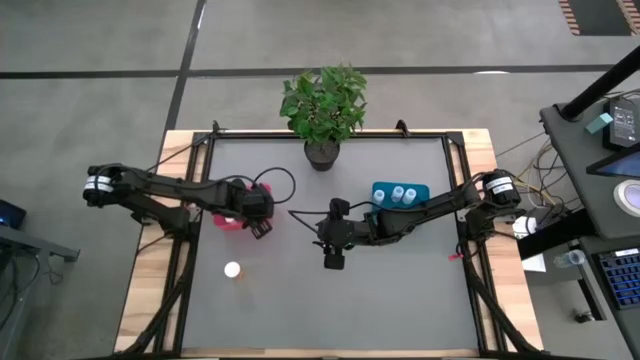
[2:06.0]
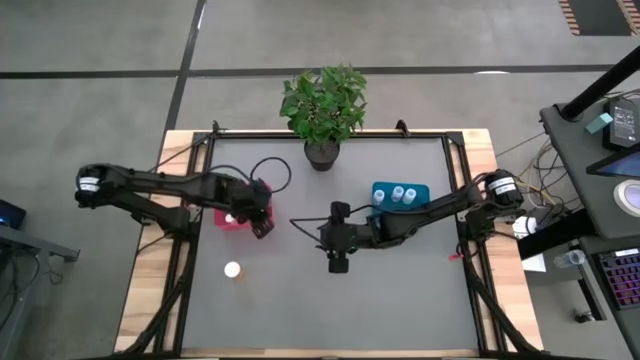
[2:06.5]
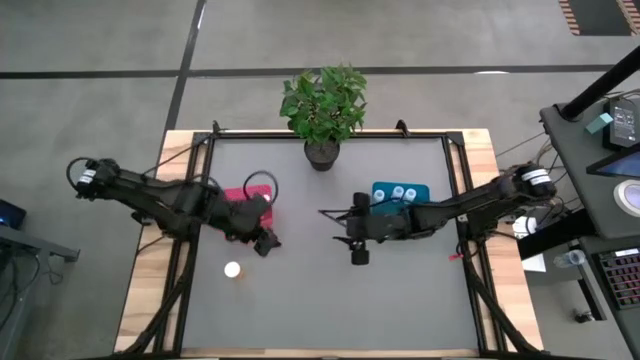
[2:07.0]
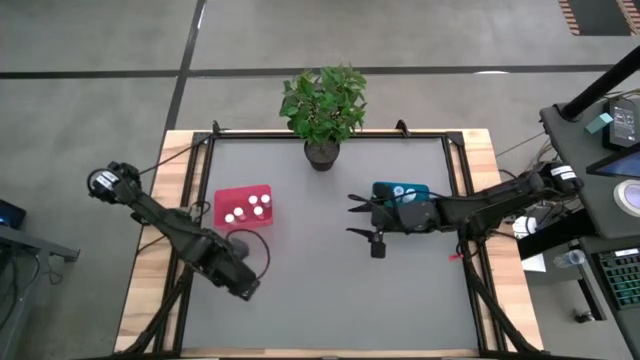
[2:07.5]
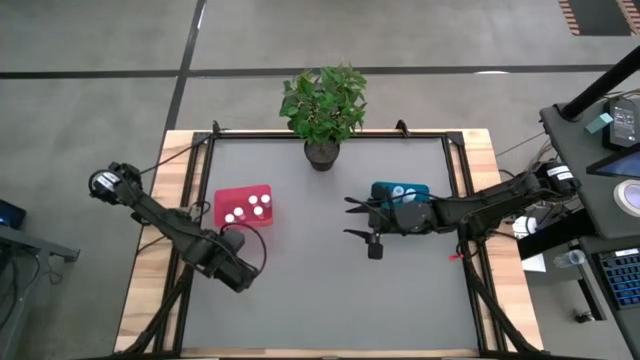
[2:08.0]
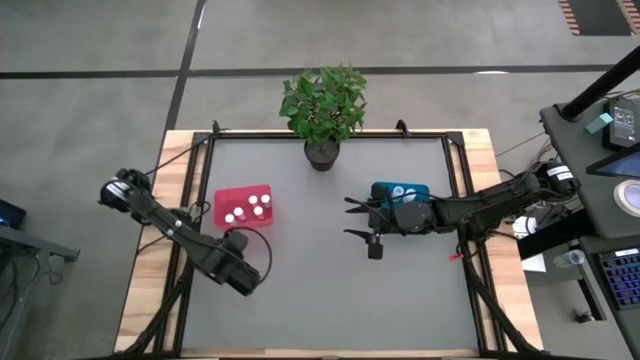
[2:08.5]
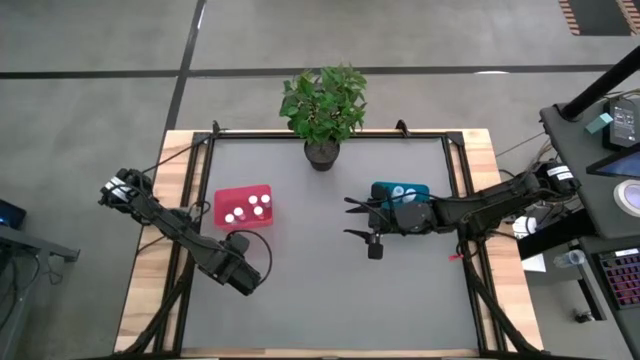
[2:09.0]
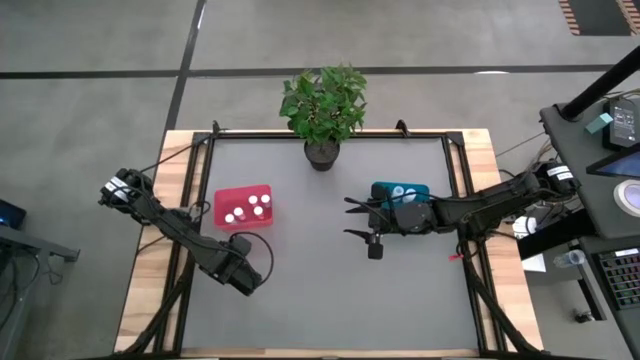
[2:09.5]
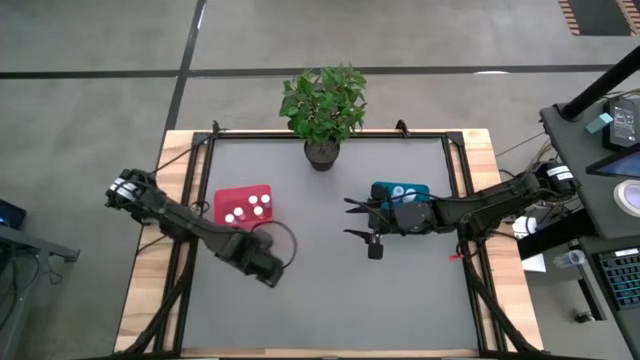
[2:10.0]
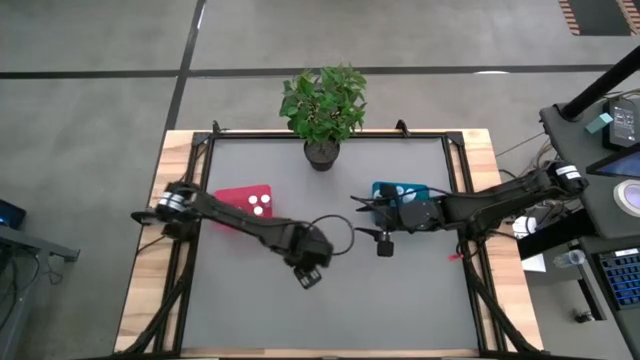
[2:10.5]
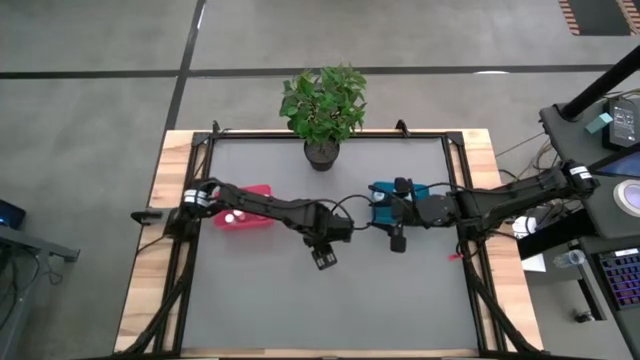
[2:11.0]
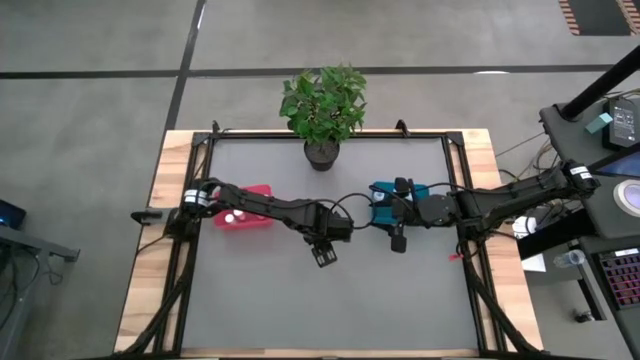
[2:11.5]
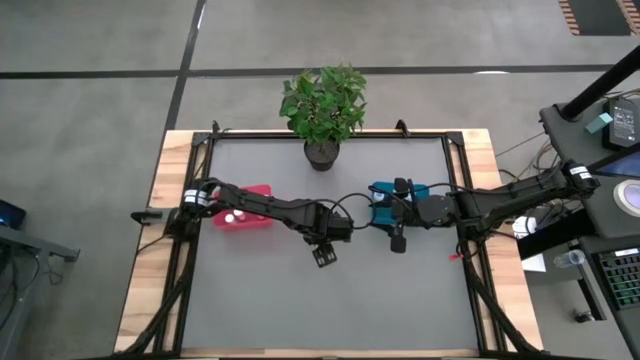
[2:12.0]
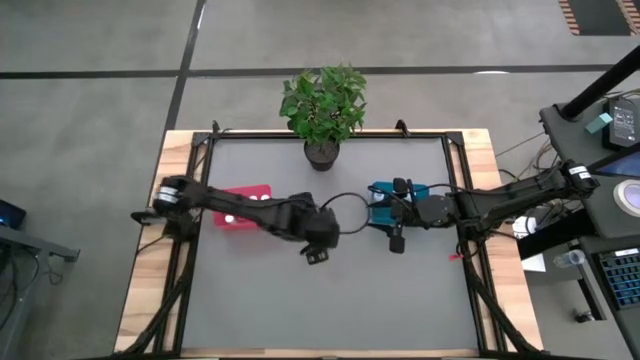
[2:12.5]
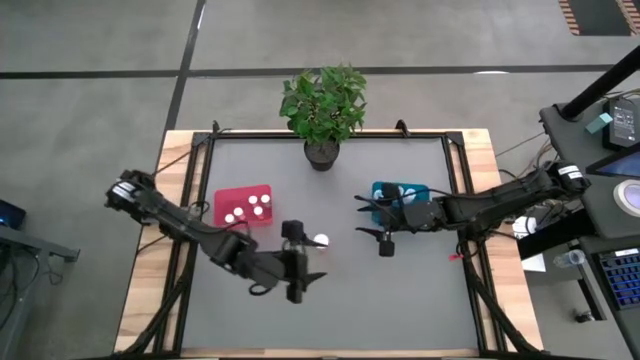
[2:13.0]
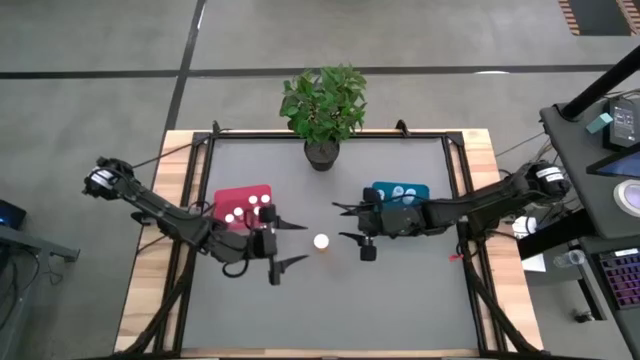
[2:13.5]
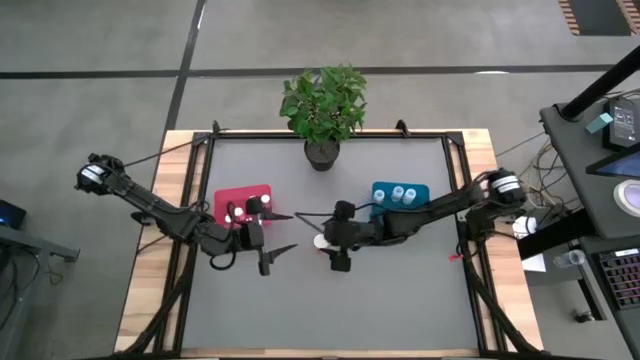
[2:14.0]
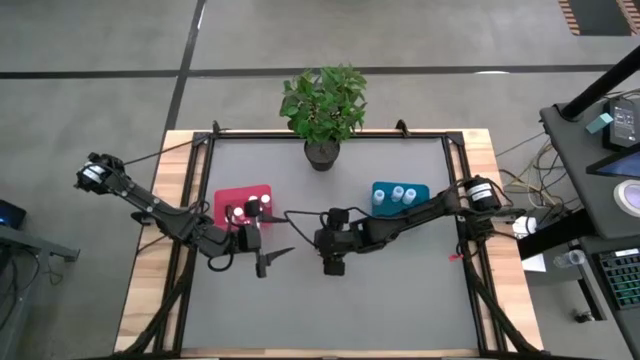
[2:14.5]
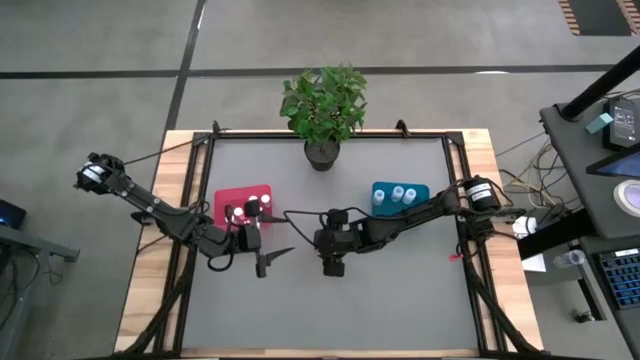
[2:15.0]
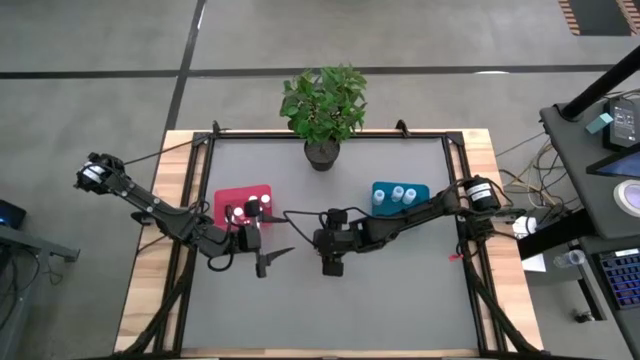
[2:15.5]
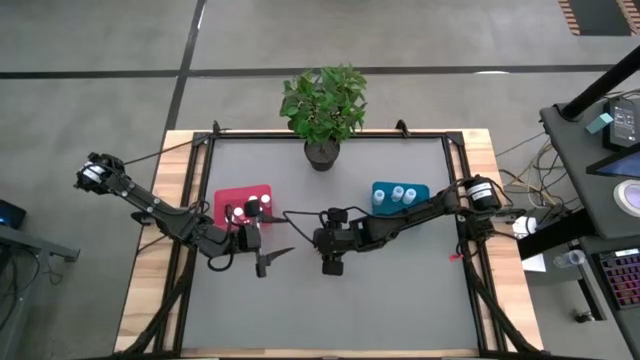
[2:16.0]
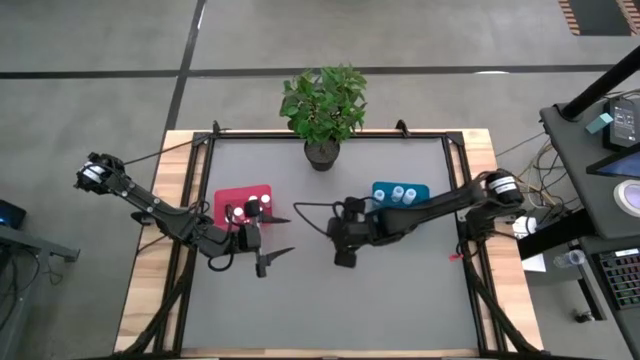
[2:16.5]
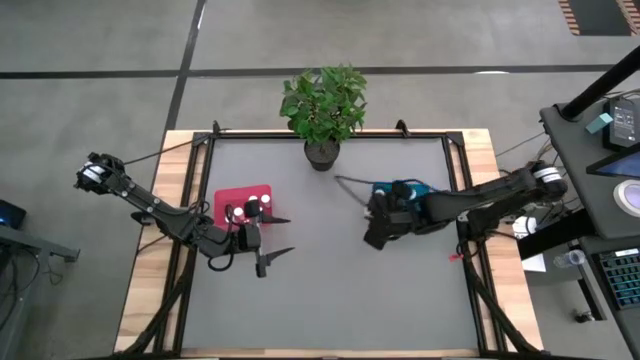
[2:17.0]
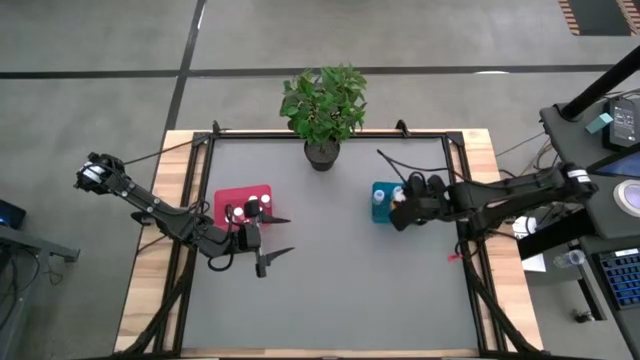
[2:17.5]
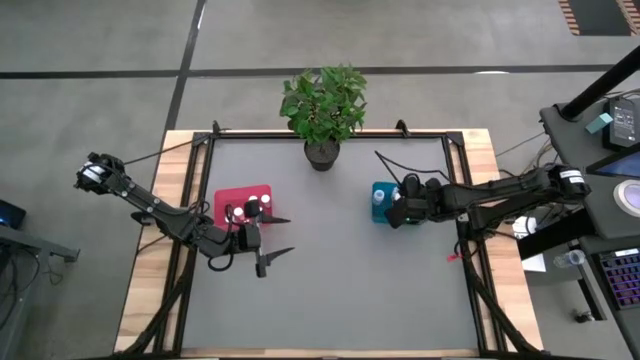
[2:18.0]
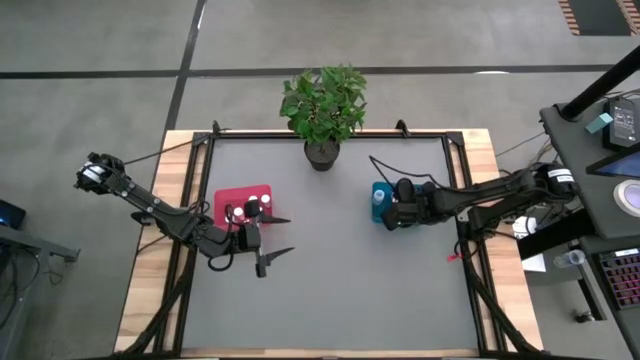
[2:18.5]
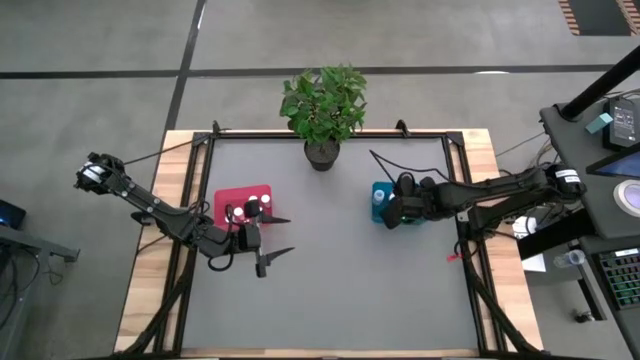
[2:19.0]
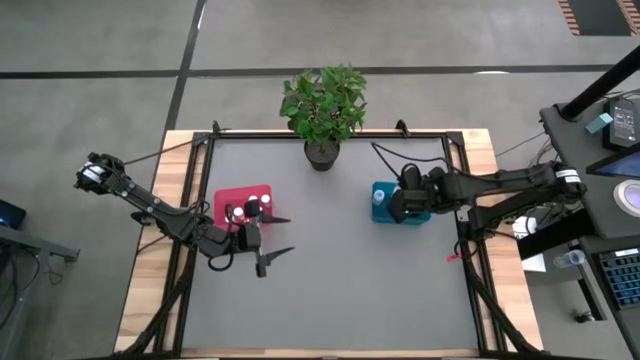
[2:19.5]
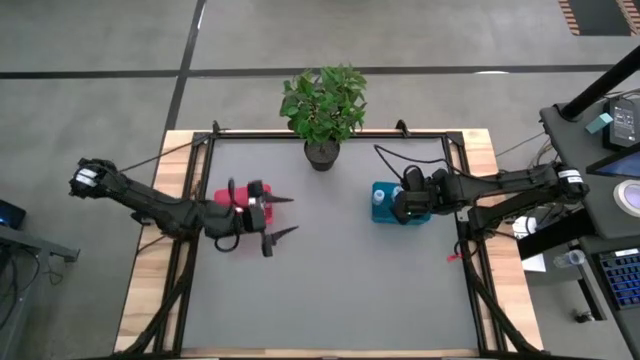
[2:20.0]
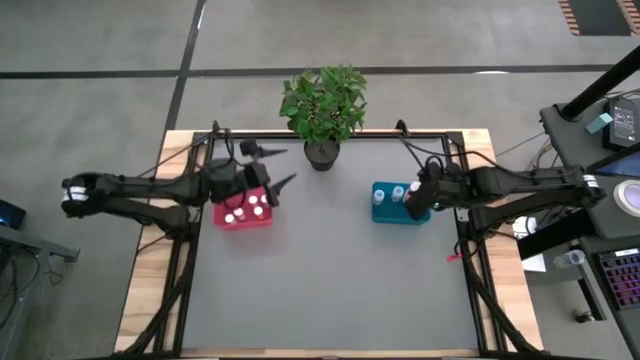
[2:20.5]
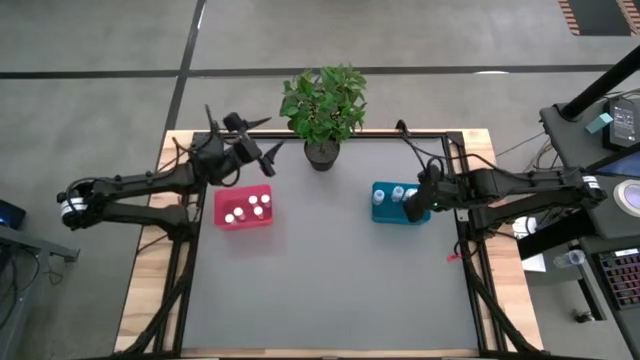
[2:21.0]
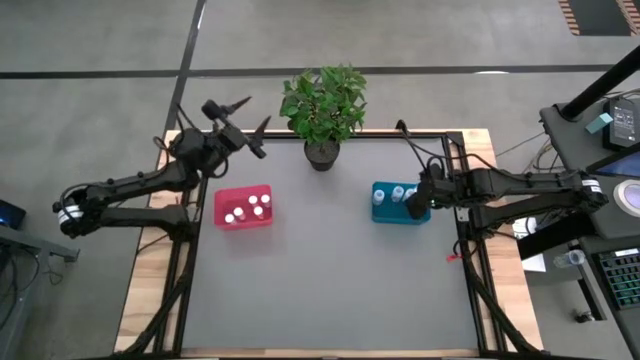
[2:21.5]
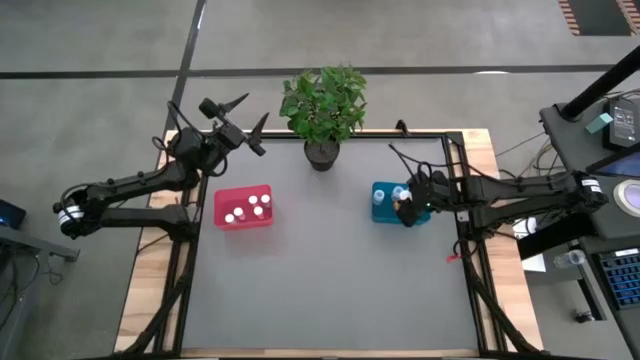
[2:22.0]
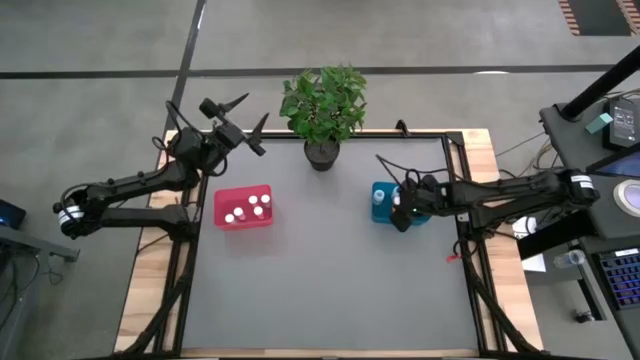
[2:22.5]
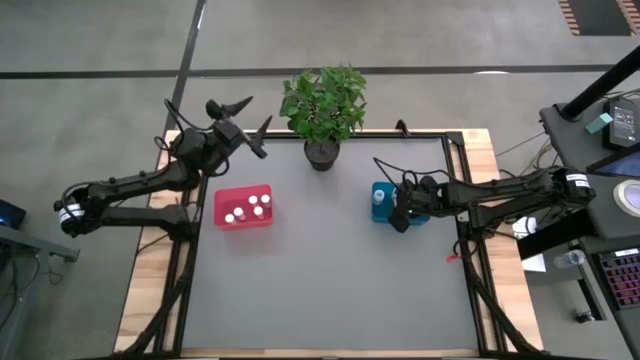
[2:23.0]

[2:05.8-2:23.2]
Task: Pick and place medicine bottles into bin by pill shape (circle, oval)
Put the orange capsule bottle into the blue bin

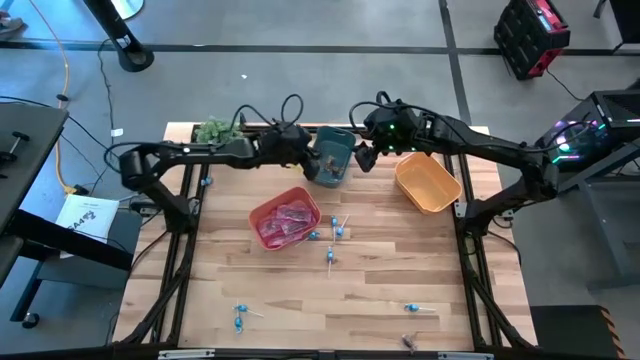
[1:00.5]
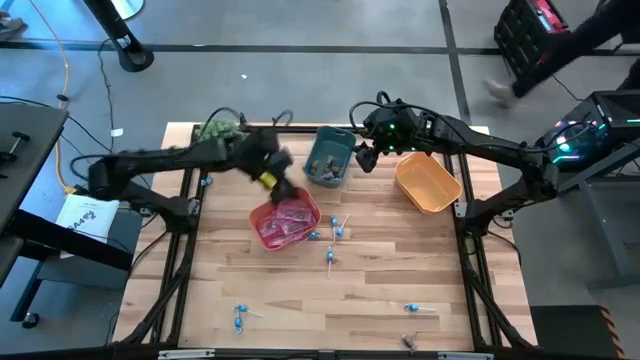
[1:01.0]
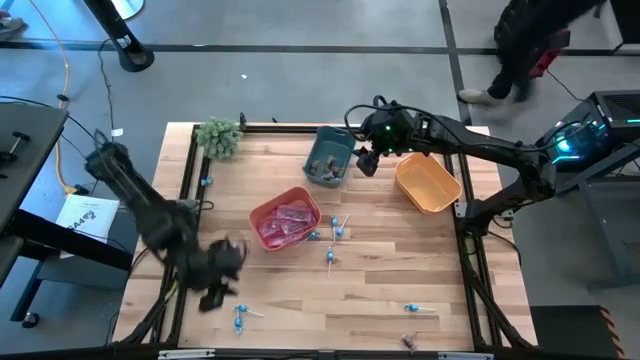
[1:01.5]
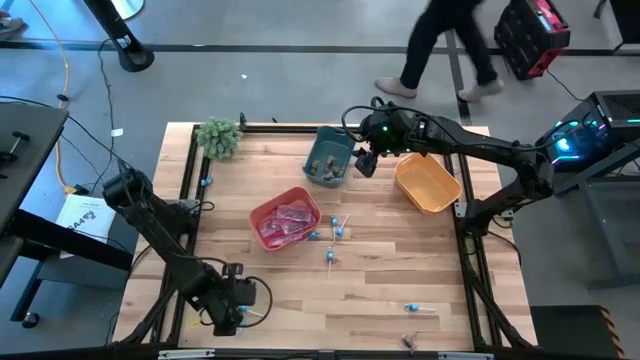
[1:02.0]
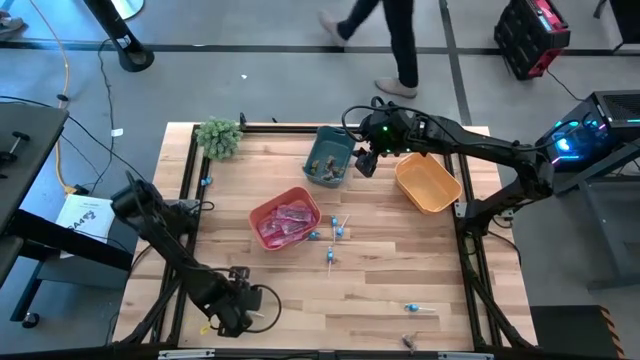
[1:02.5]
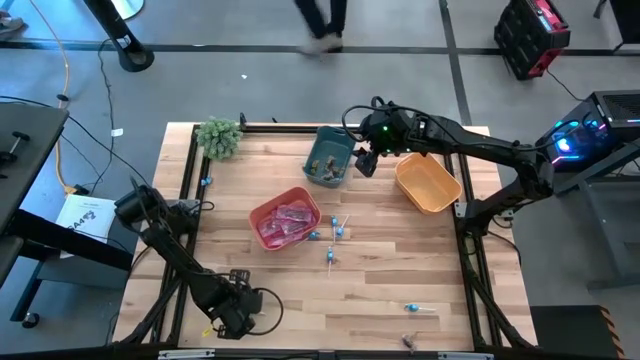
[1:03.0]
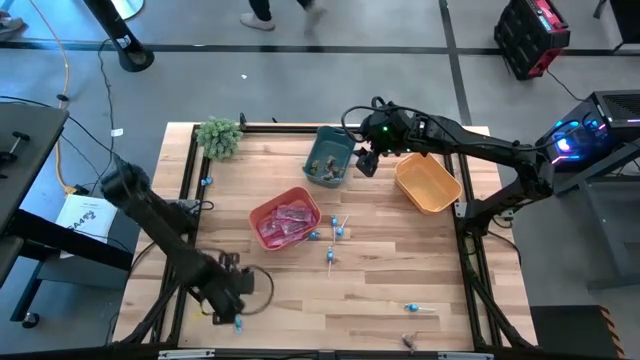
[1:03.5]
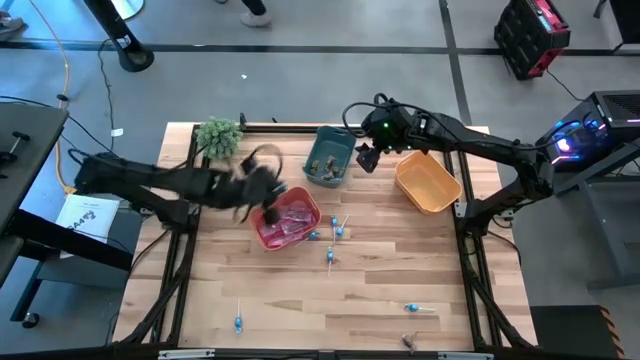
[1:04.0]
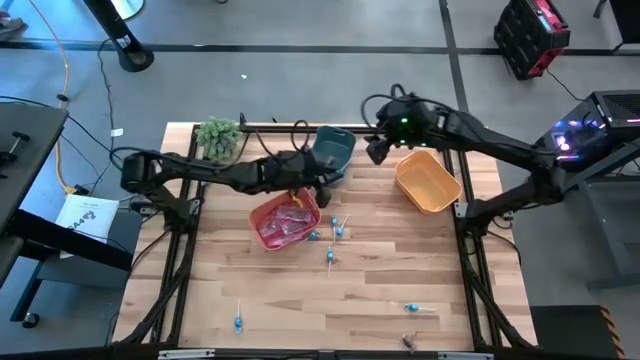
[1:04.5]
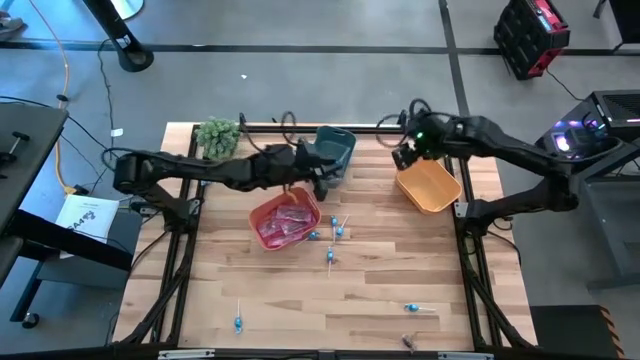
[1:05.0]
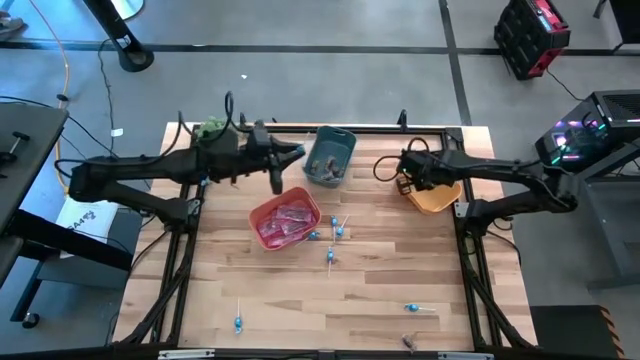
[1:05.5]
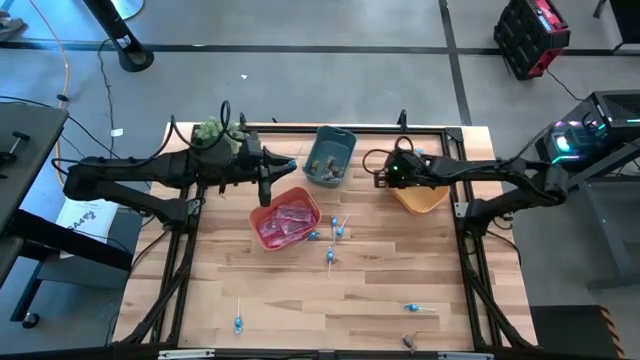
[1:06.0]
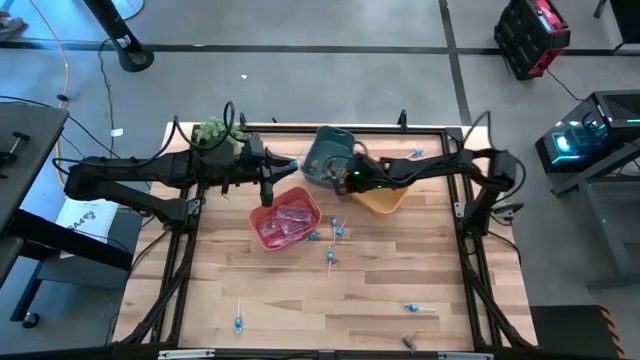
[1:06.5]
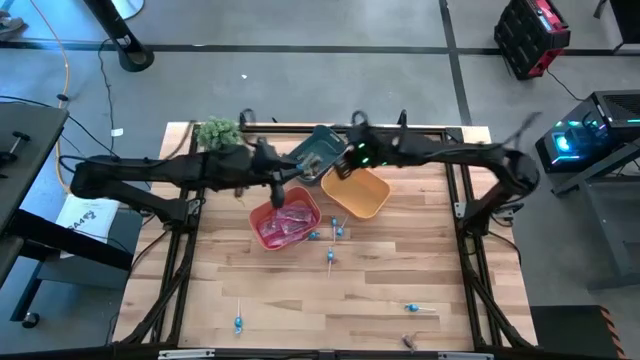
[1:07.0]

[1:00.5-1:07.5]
Task: Sort candy
Put the blue candy into the yellow bin
